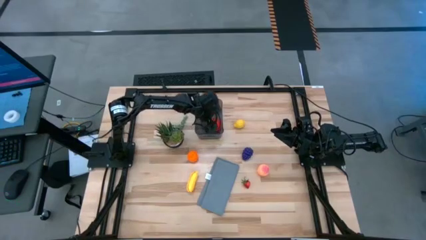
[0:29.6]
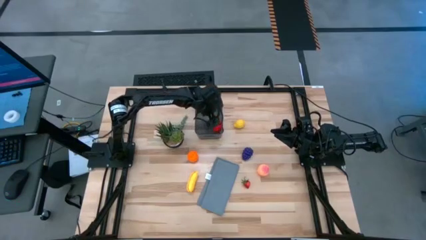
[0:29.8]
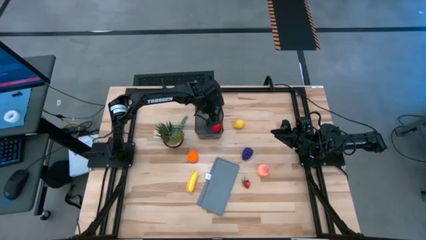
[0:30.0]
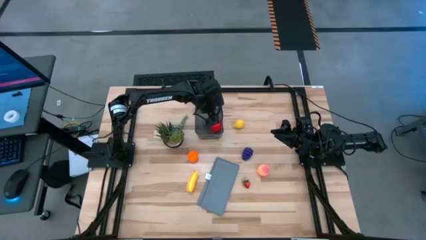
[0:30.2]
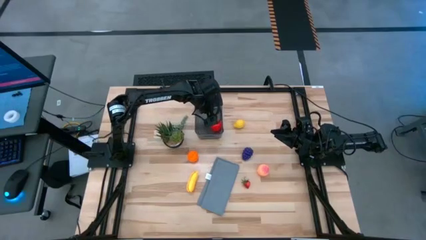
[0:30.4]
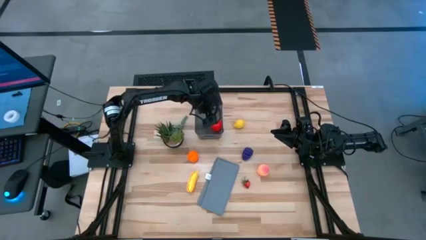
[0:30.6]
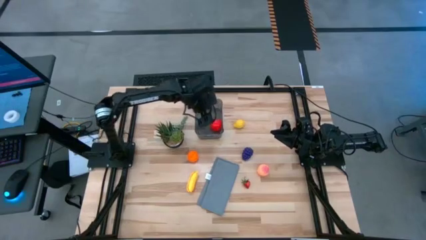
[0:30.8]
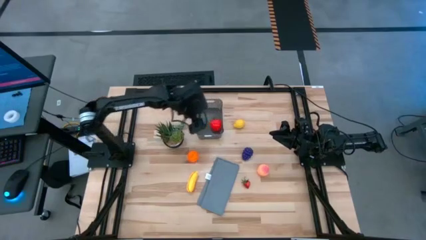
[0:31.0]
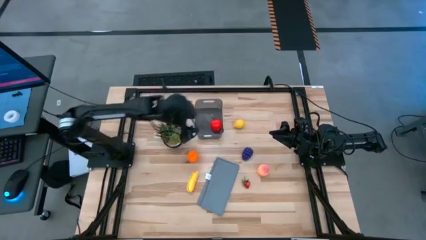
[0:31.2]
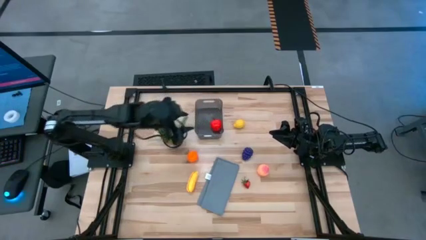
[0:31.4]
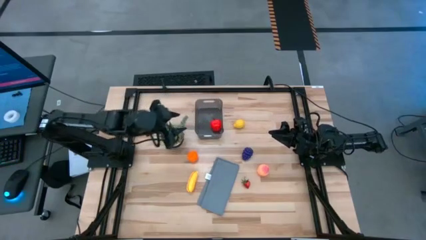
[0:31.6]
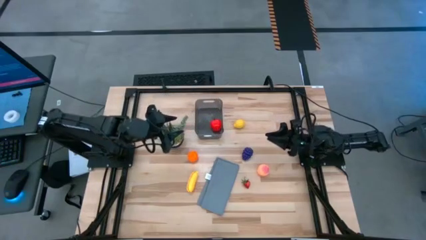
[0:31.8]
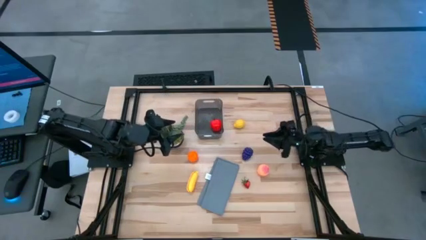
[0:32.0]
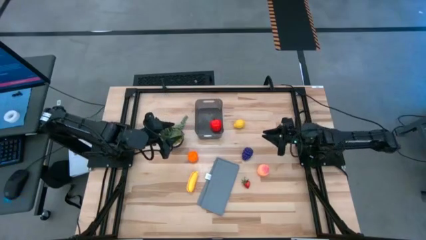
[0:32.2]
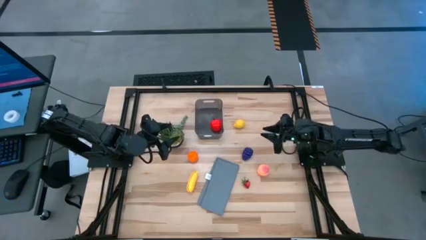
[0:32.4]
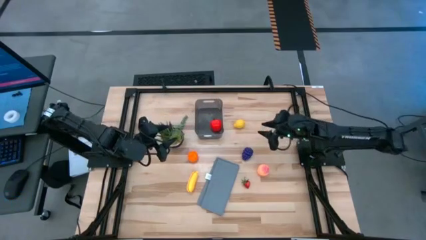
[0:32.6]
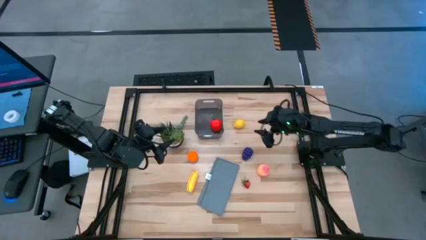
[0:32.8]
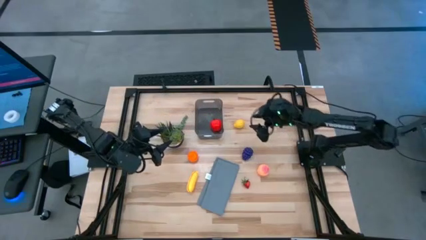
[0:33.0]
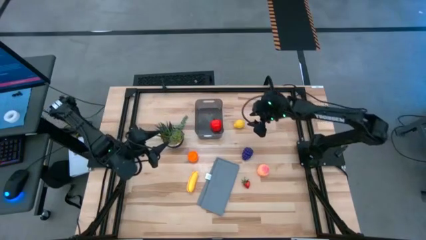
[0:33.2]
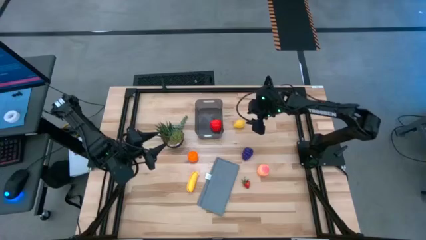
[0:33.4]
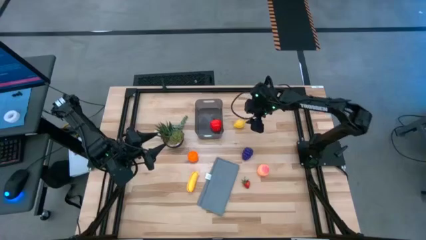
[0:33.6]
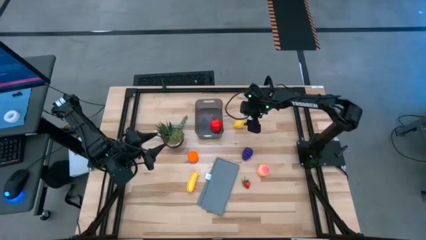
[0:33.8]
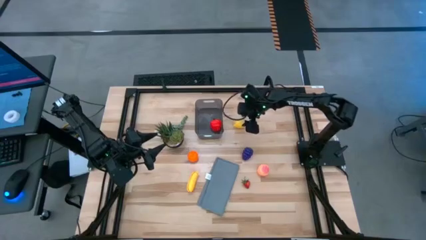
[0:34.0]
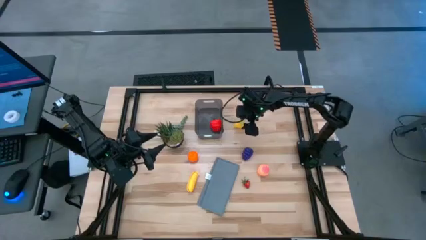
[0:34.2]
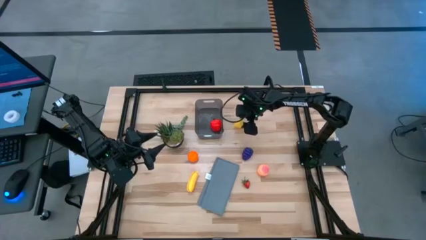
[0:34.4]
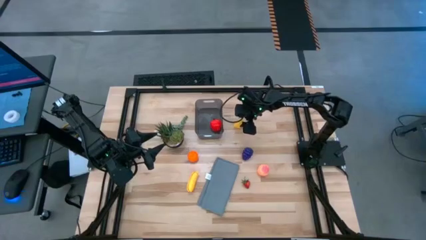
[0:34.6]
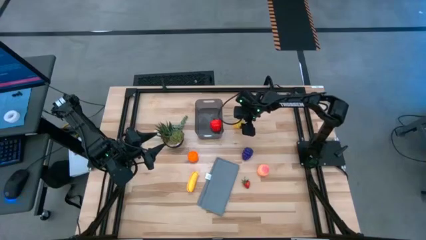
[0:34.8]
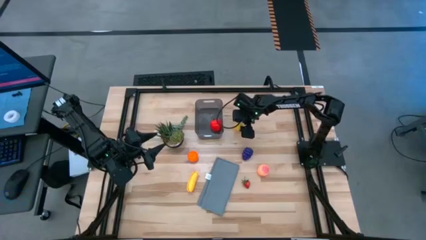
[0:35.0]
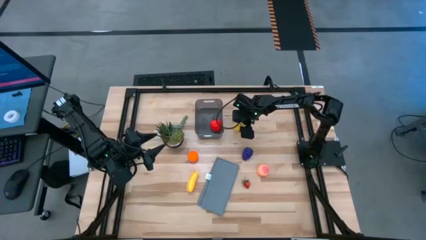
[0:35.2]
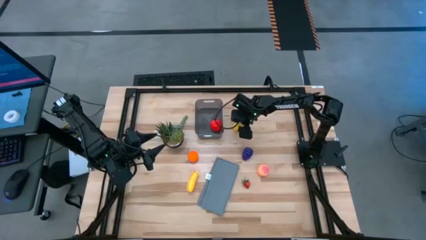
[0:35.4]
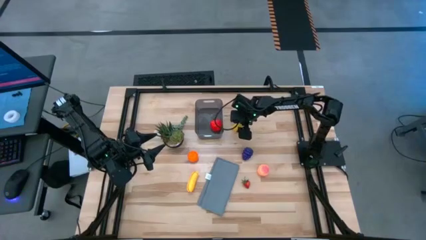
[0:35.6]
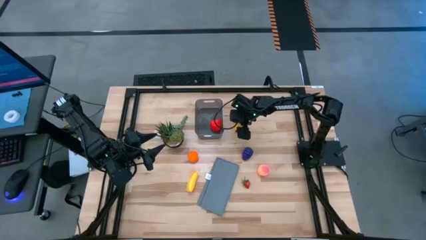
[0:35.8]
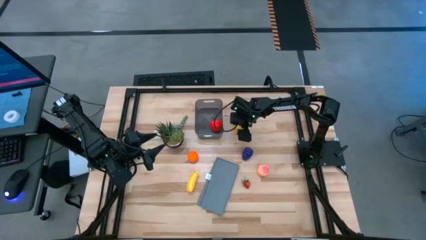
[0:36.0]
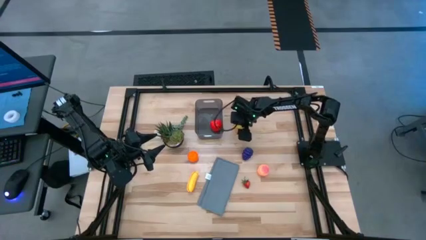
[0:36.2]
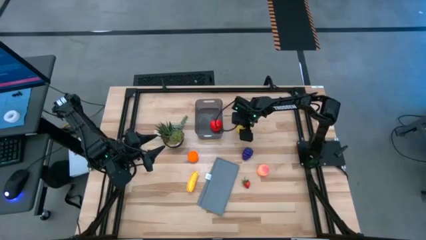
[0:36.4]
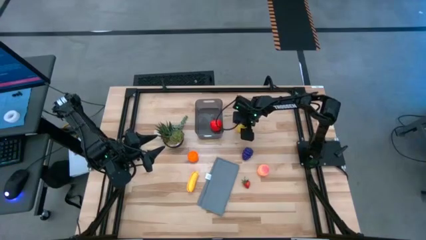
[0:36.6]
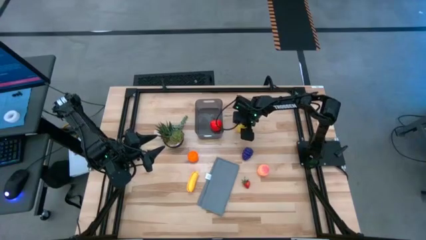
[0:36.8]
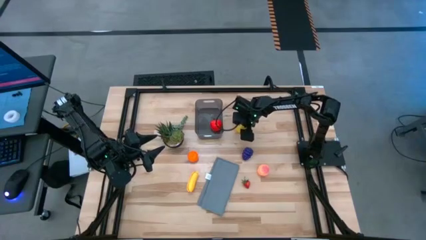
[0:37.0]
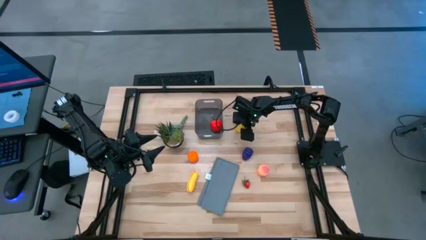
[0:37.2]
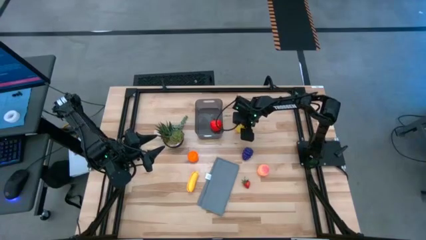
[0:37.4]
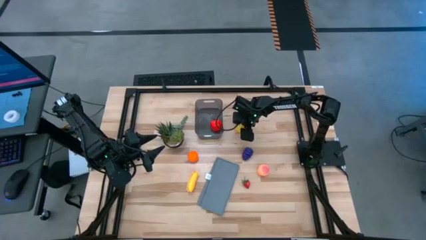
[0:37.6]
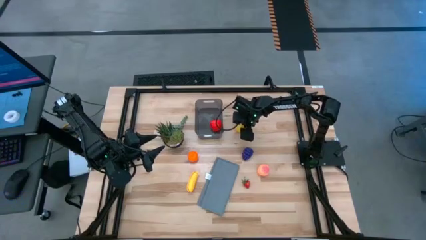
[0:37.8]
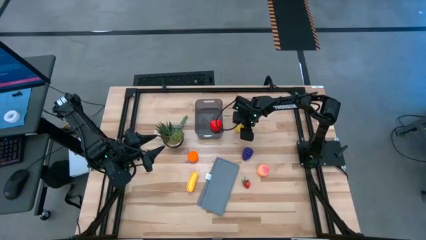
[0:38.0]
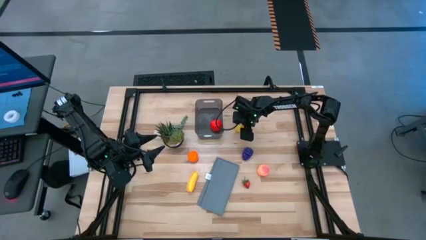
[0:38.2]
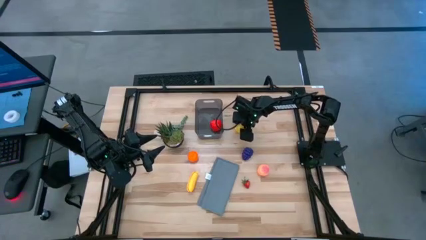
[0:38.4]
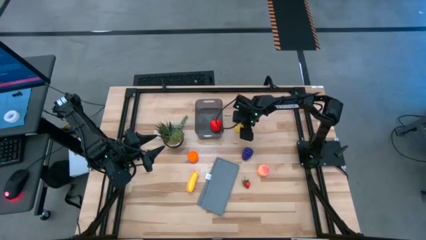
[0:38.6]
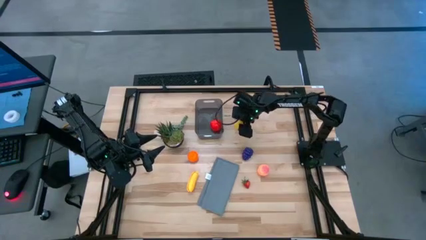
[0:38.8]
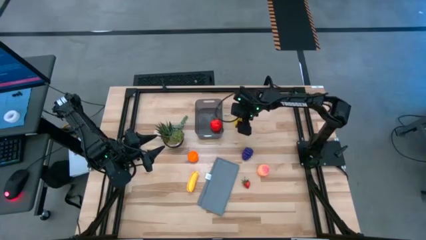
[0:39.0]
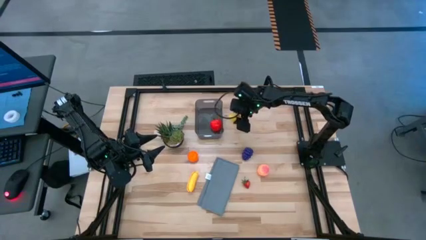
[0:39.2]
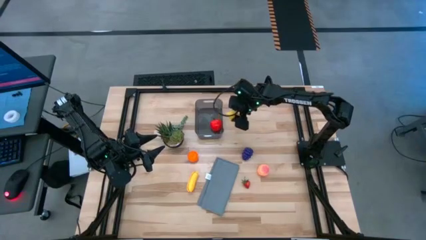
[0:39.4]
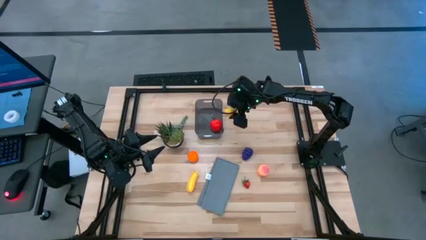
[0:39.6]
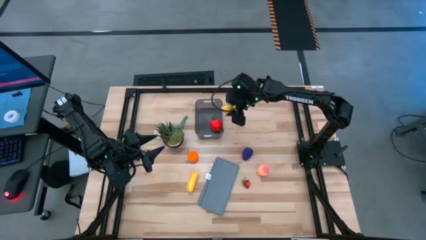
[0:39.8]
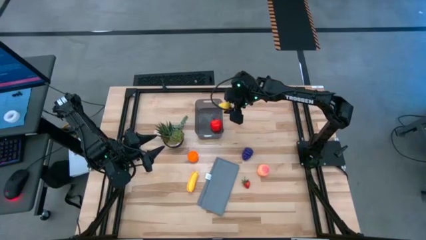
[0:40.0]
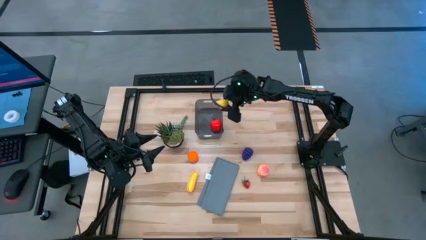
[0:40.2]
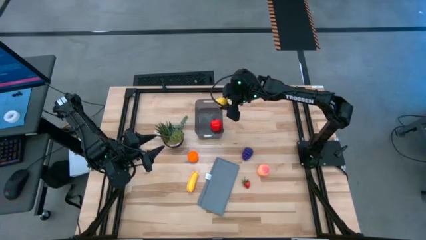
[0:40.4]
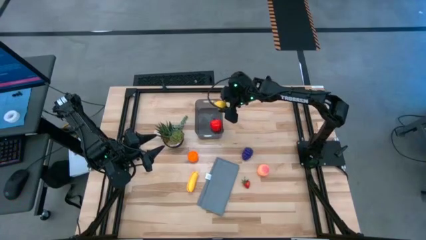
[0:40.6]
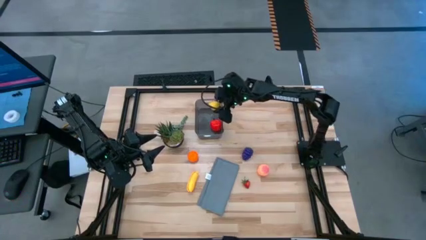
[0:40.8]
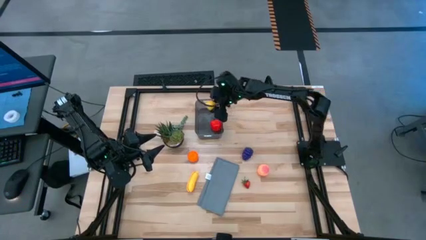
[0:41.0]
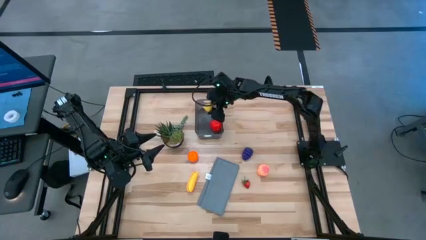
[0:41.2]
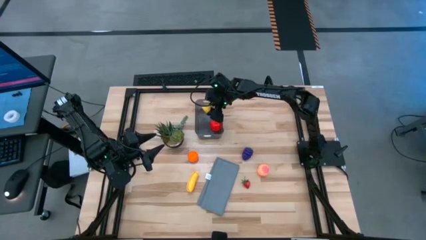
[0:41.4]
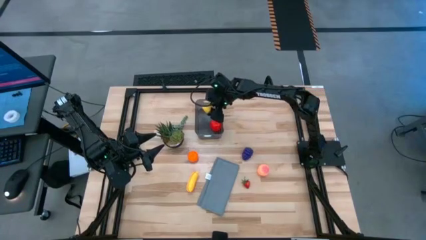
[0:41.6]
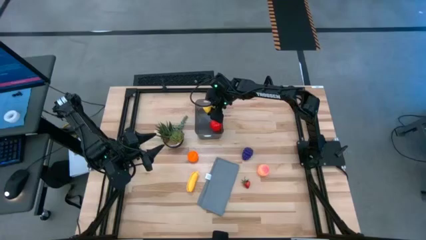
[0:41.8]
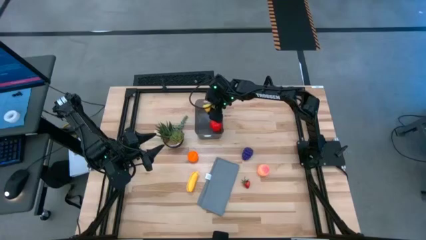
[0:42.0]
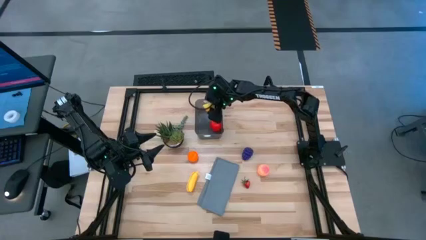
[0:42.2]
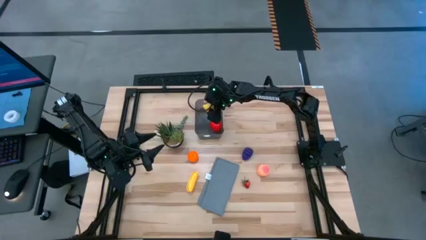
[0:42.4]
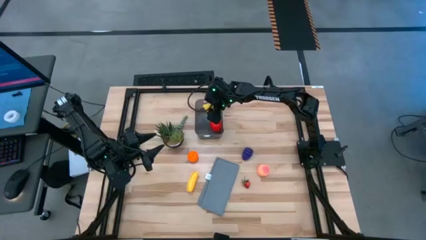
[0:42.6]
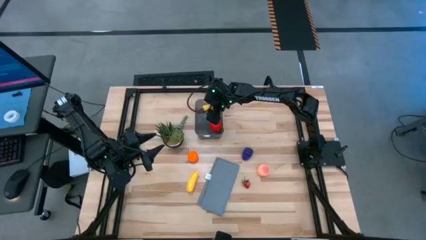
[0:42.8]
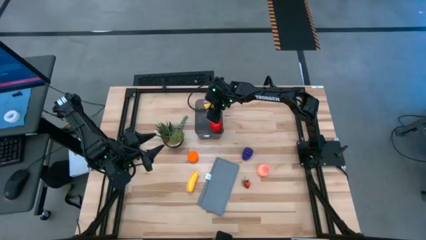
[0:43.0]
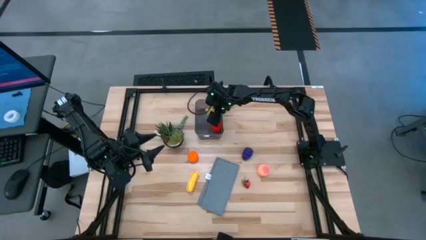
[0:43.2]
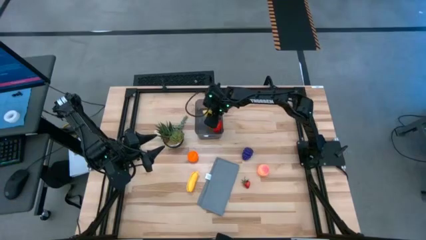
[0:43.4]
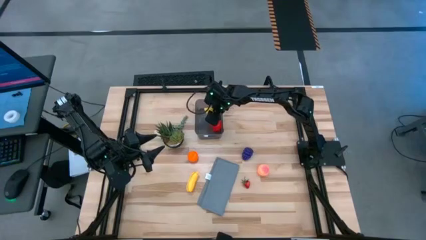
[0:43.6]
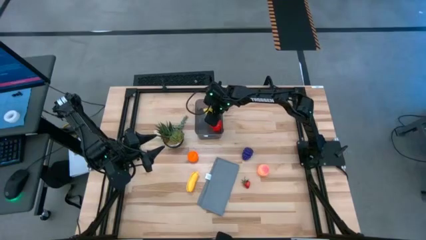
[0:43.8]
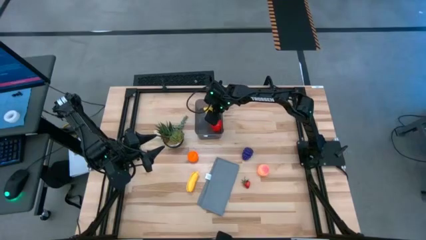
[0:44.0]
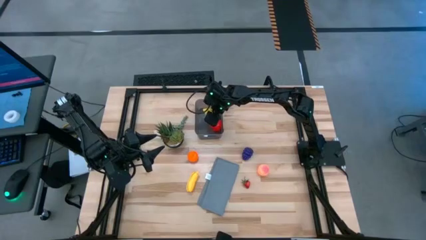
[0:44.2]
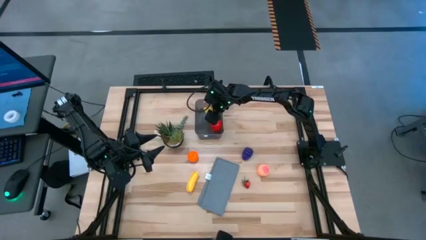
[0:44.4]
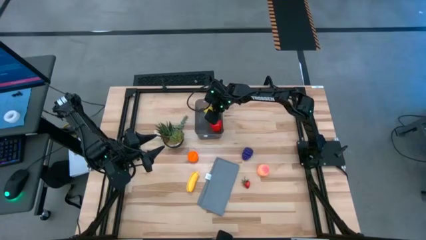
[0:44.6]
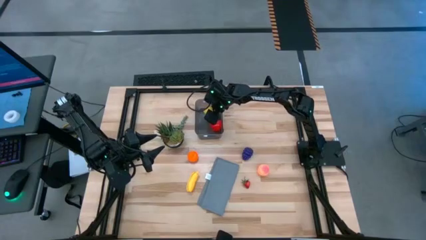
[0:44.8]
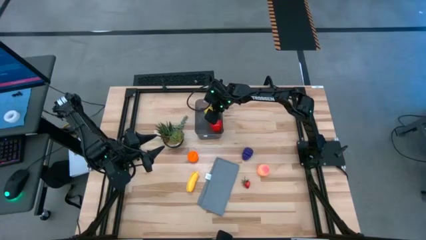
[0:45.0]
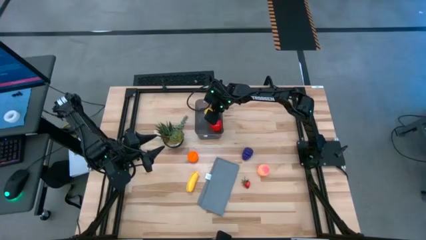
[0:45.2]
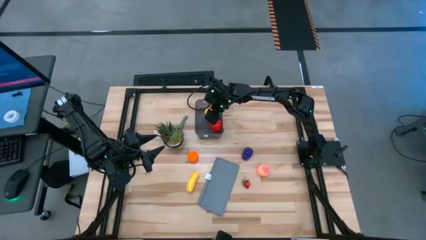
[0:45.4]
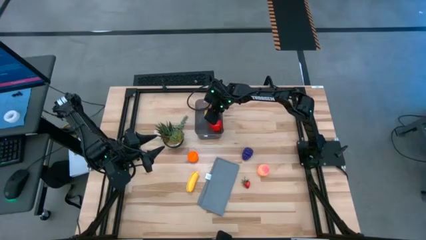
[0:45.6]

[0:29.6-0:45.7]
Task: Pick and placing Produce into tupperware
Put the yellow lemon into the black bin
